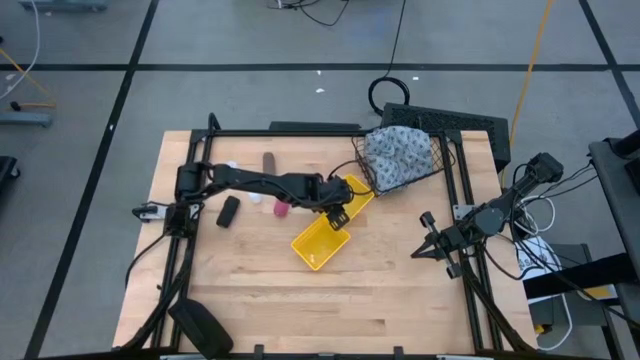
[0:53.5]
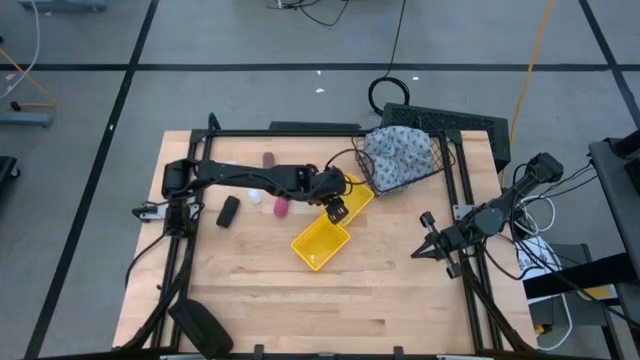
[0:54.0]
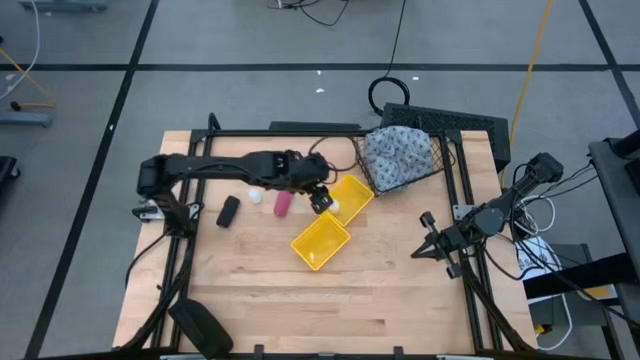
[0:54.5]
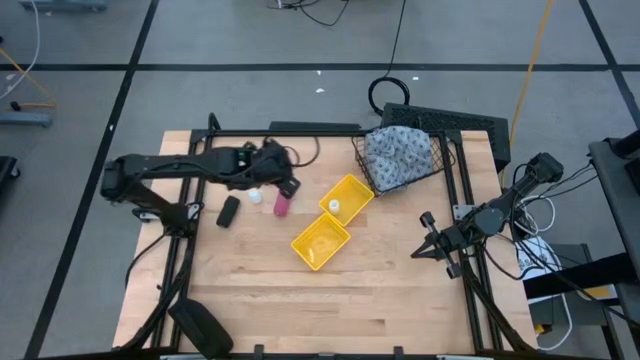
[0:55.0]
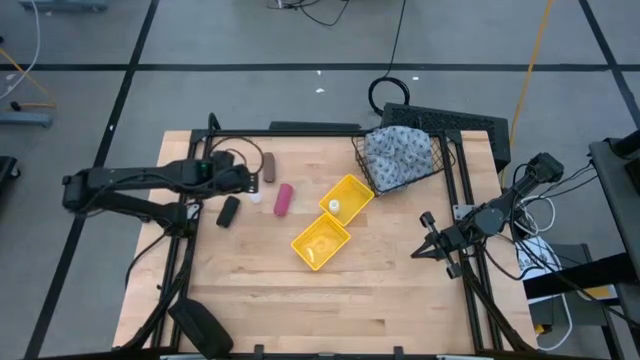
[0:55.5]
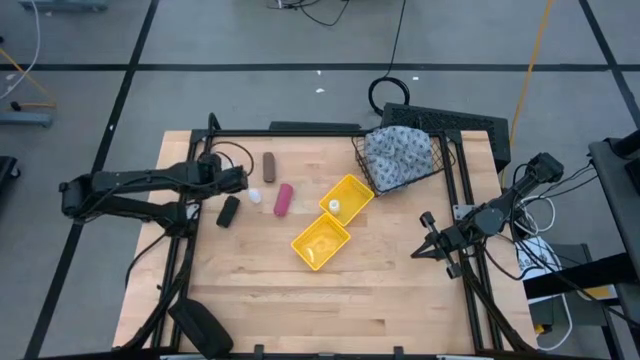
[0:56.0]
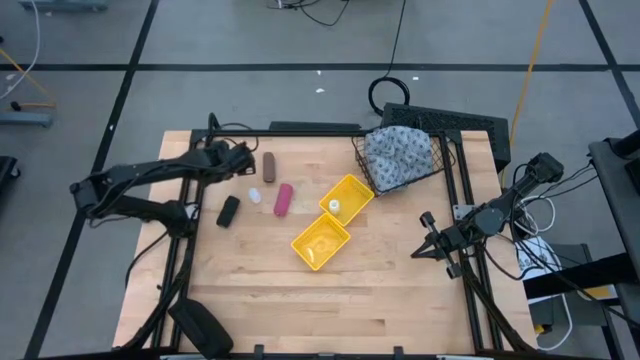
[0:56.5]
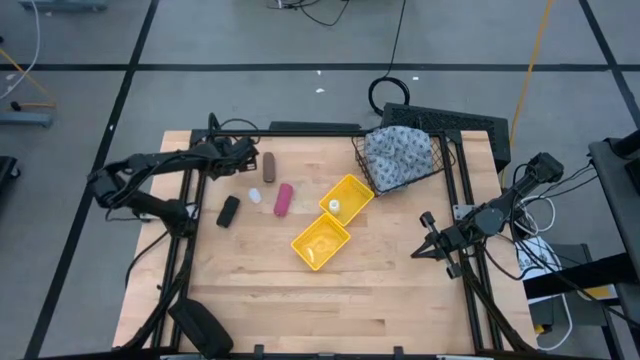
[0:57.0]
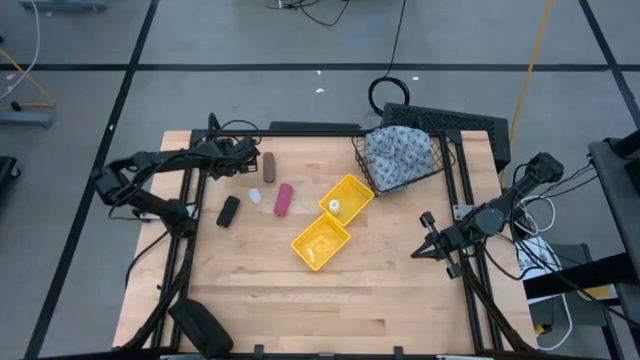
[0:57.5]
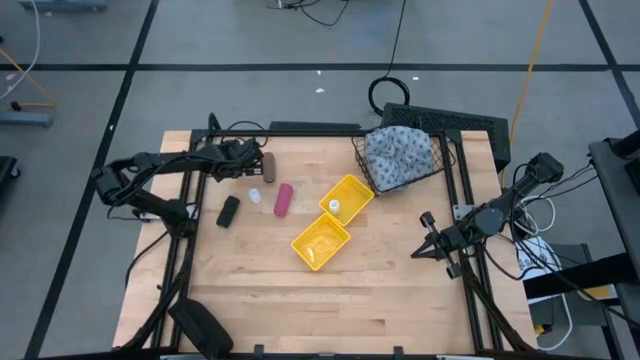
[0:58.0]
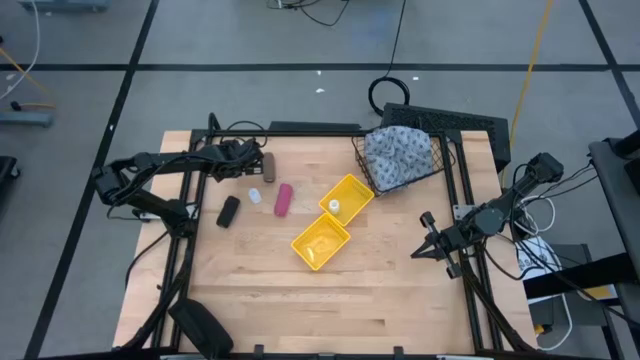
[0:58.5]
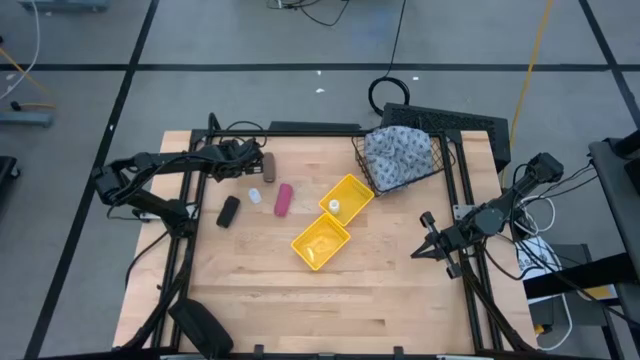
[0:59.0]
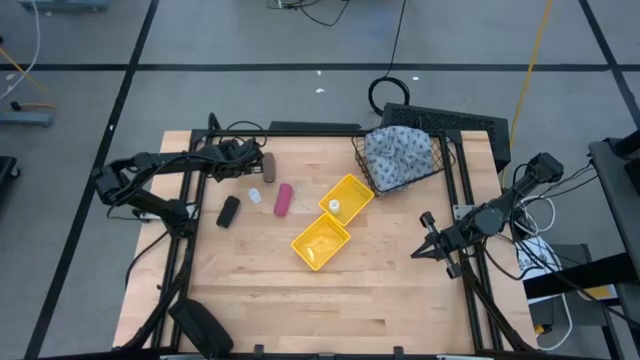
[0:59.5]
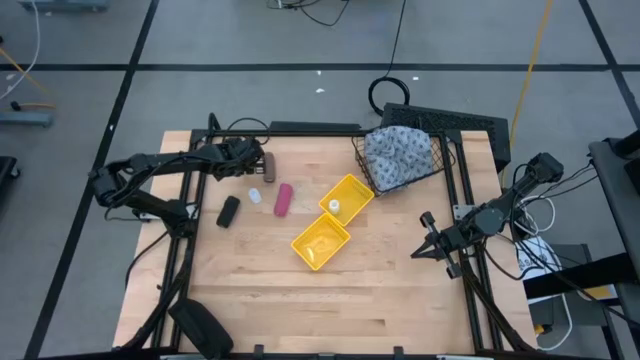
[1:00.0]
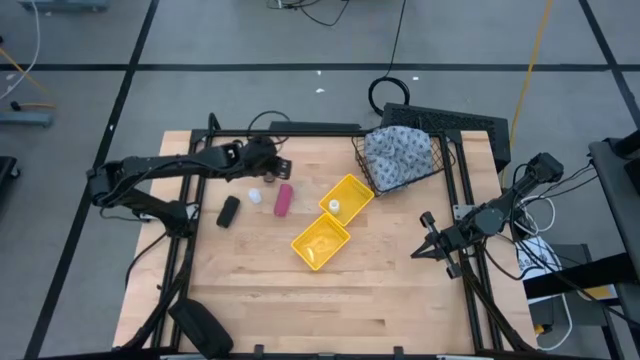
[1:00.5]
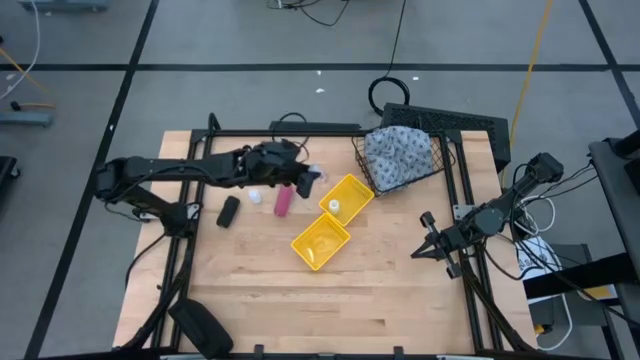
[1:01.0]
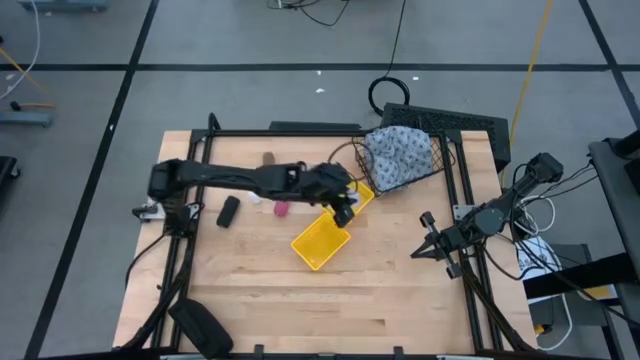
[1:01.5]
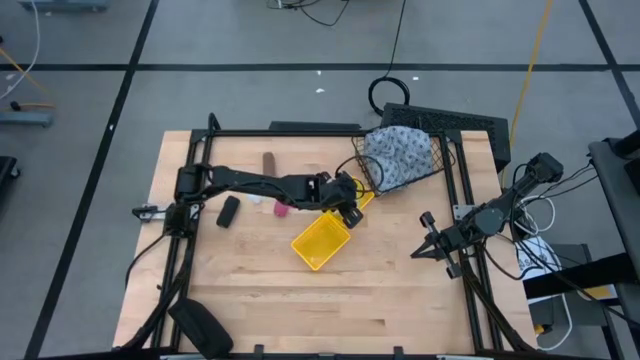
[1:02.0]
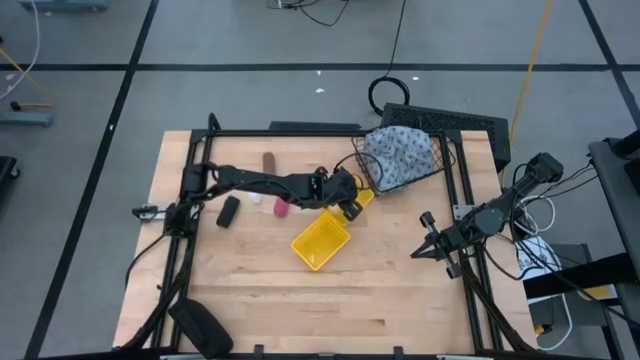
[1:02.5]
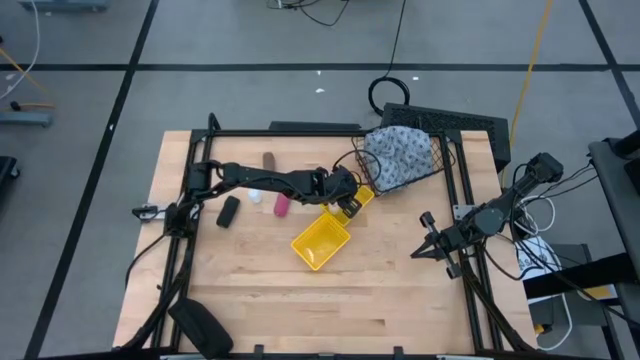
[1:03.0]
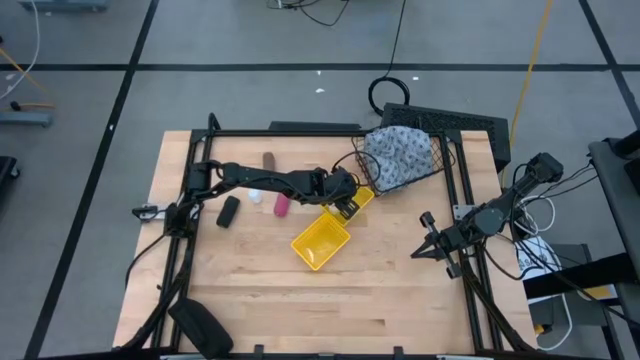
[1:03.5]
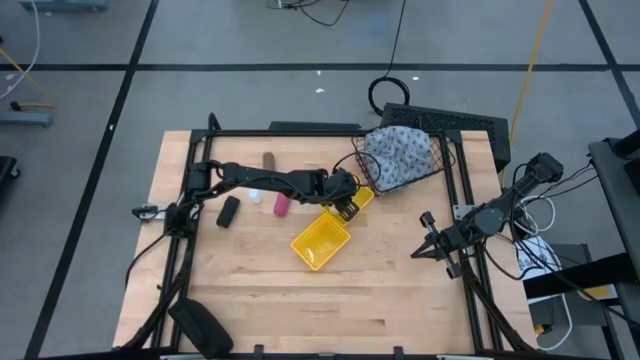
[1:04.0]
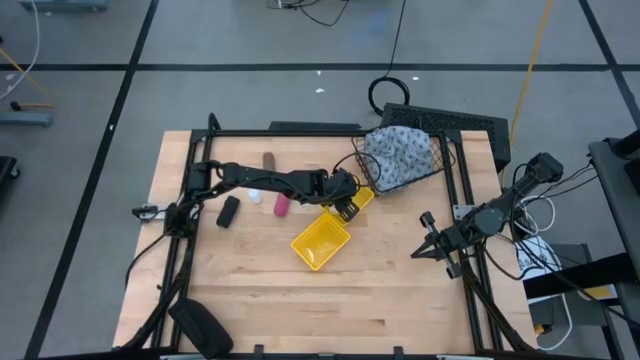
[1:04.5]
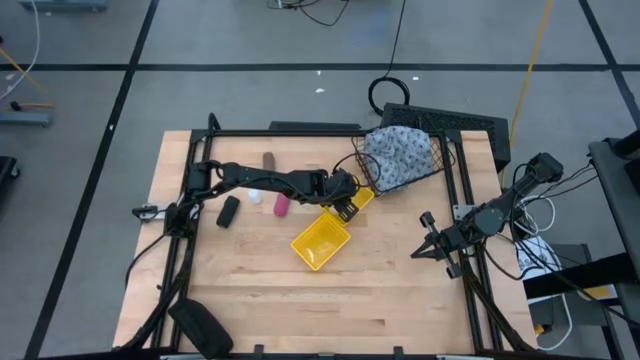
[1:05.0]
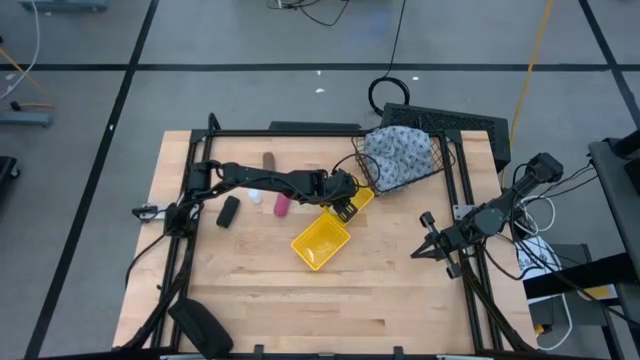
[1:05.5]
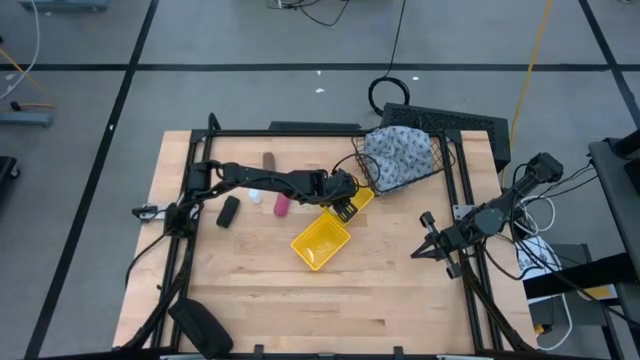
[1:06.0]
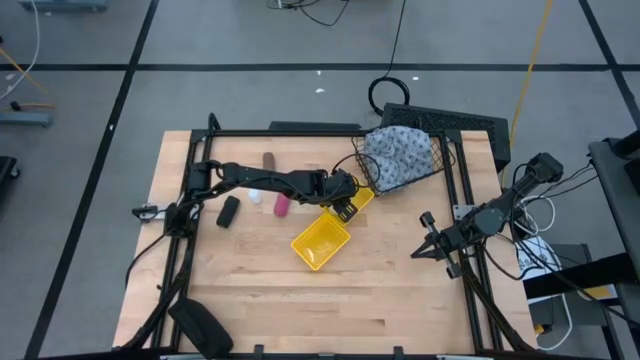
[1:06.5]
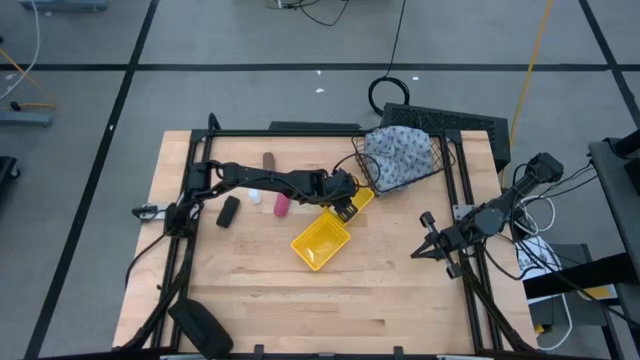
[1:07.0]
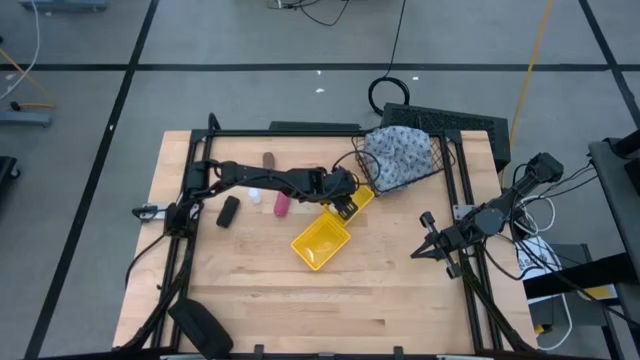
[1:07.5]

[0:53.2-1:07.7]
Task: Pick & place medical supplies in basket/bin
Put the top white pill bottle into the top yellow basket

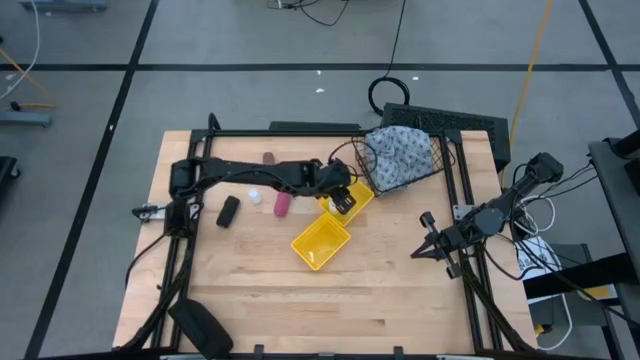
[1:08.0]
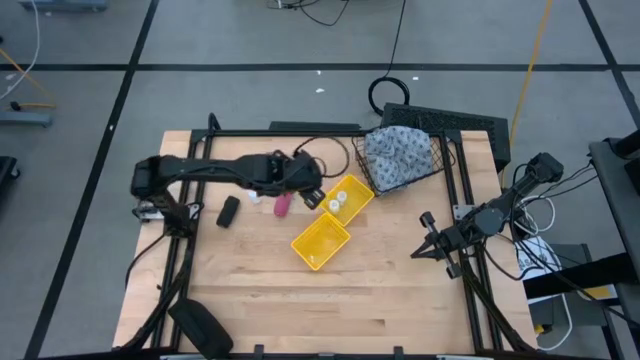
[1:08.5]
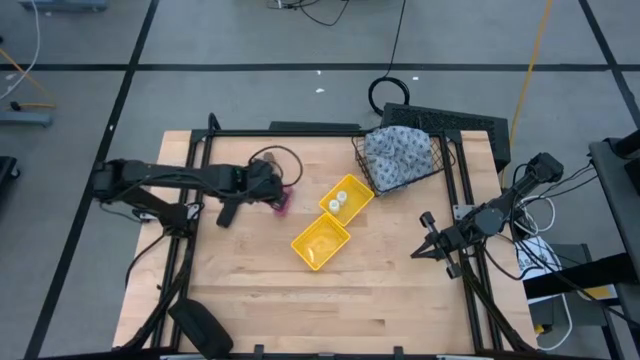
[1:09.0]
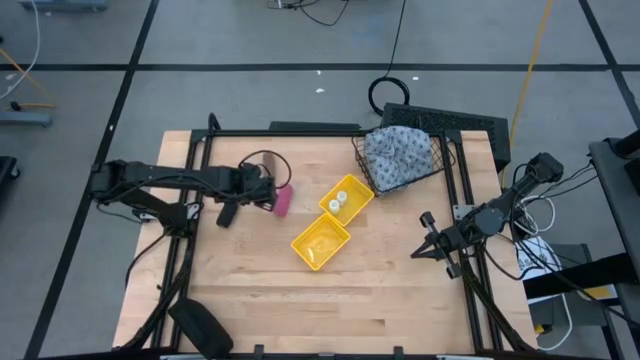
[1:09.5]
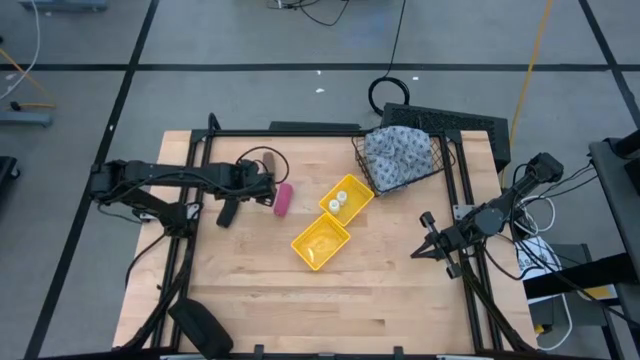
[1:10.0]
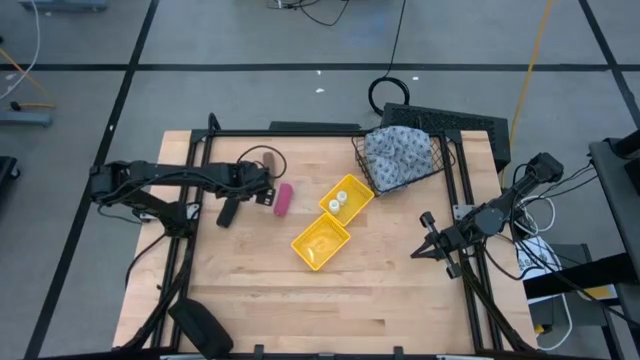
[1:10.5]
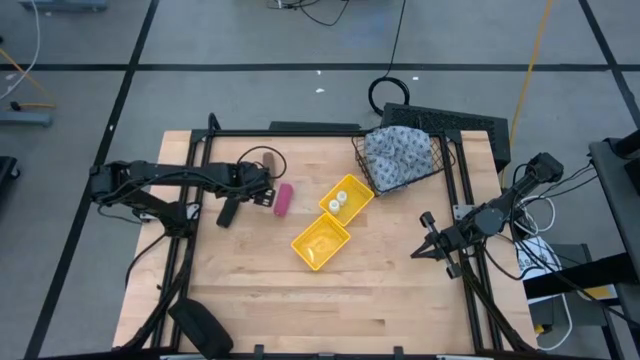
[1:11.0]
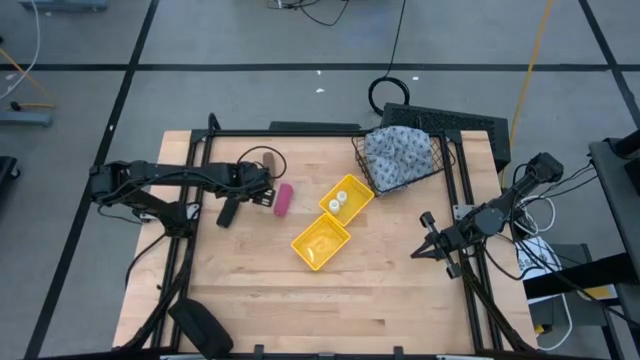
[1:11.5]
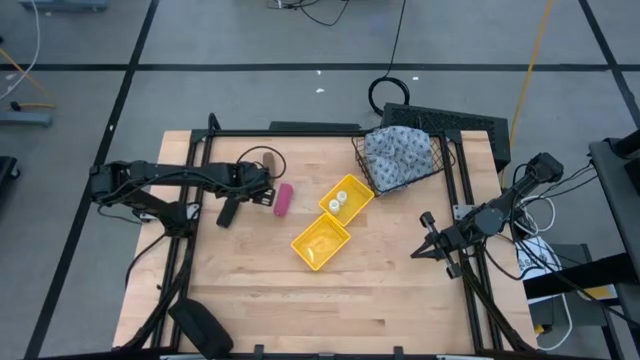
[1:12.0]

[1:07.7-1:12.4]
Put the white pill bottle into the top yellow basket

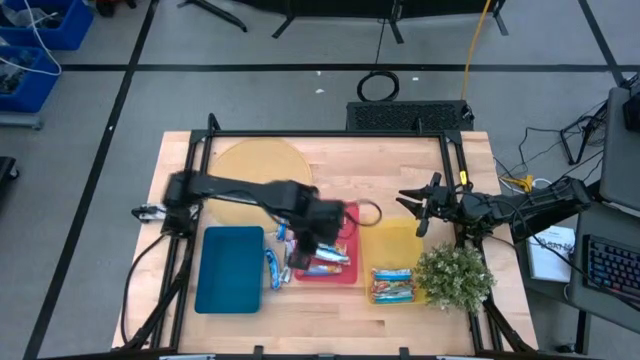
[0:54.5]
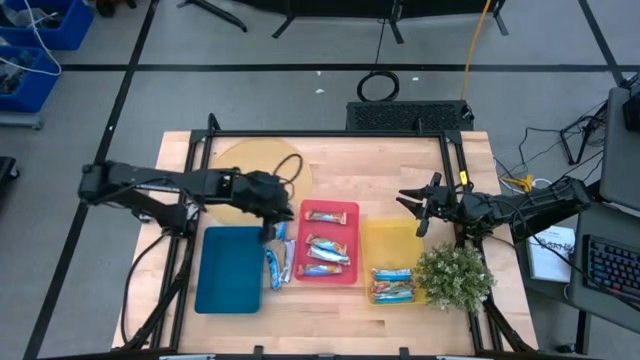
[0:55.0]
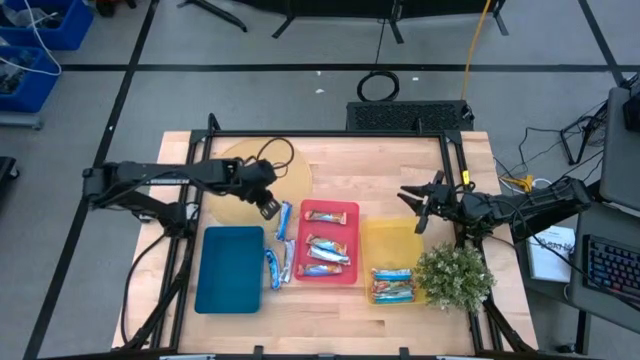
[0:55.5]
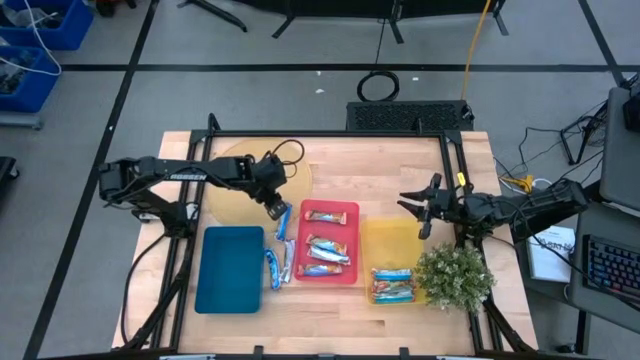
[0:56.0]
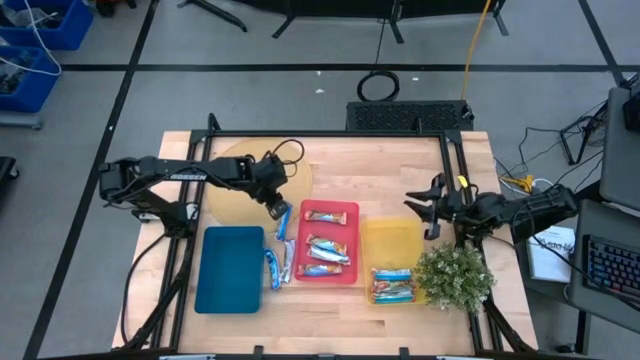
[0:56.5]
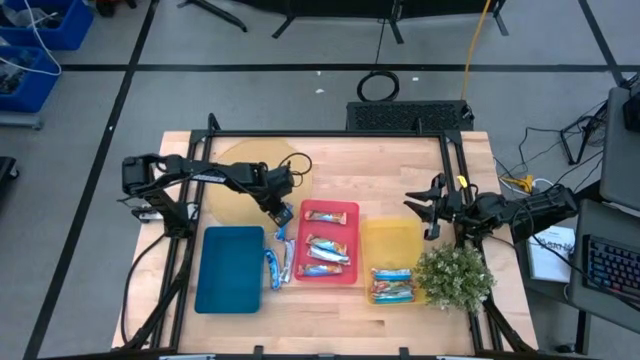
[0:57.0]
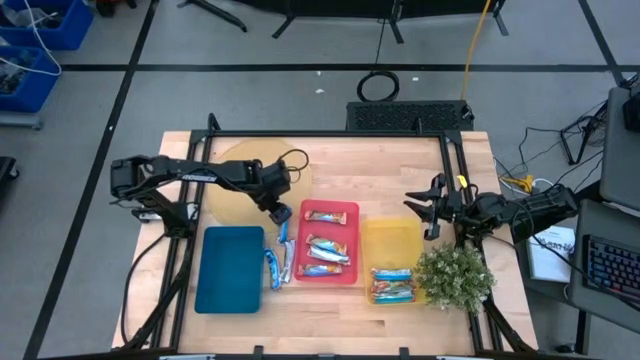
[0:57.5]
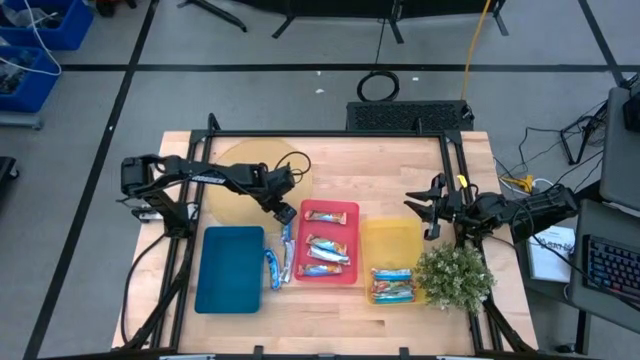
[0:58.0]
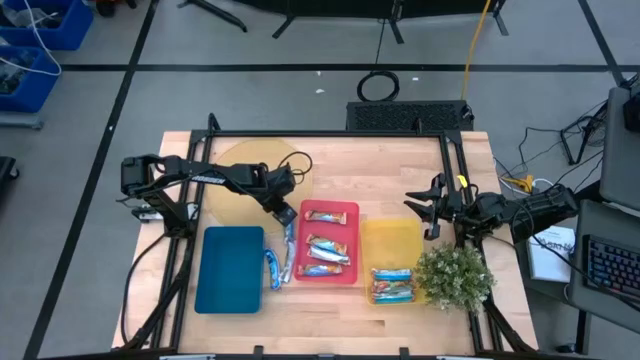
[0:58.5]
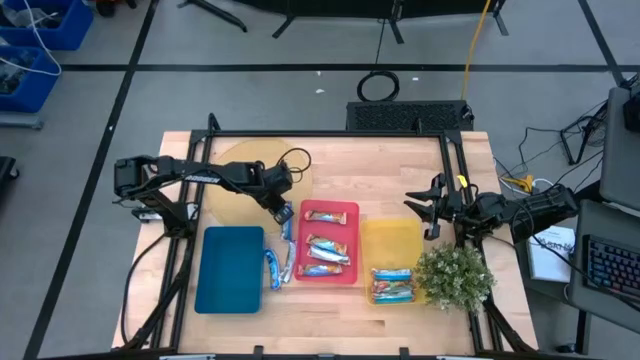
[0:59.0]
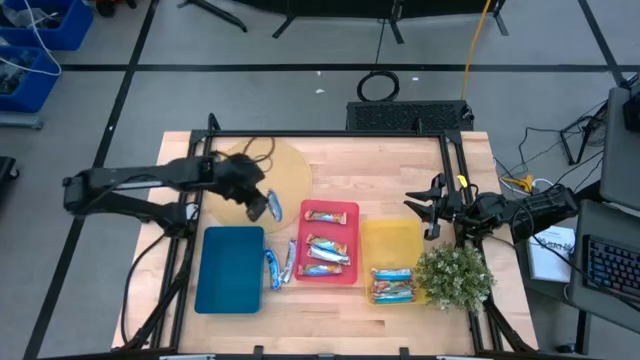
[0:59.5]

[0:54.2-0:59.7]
Task: Pick and place Granola Bars by type
Put the blue granola bar into the blue bin
